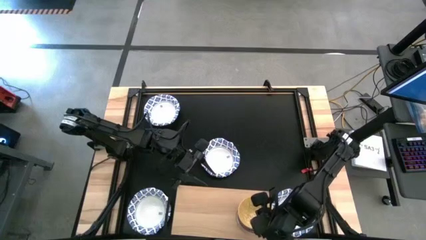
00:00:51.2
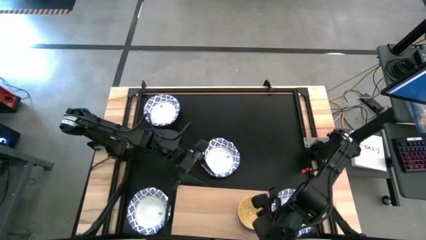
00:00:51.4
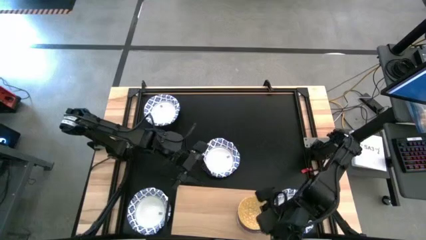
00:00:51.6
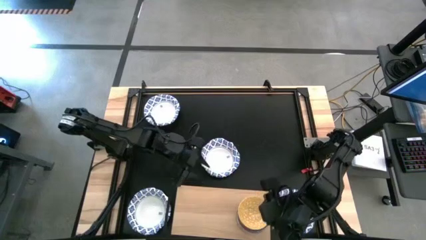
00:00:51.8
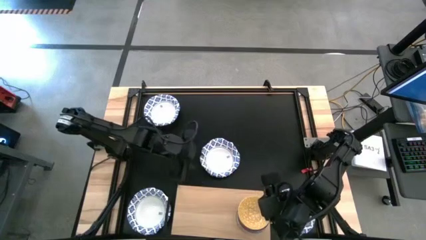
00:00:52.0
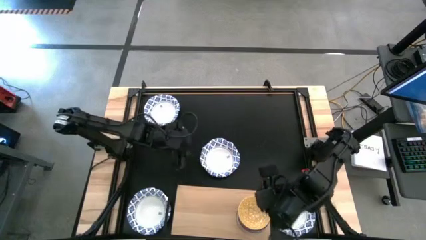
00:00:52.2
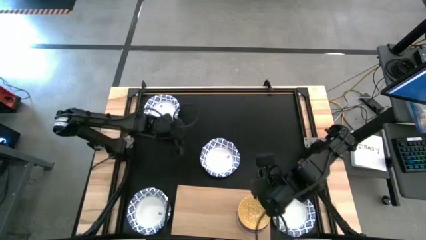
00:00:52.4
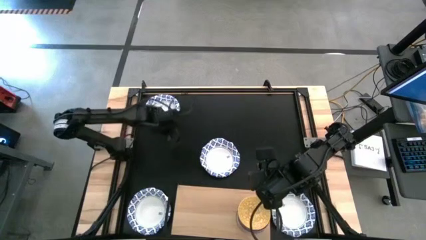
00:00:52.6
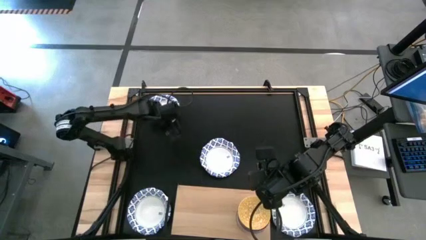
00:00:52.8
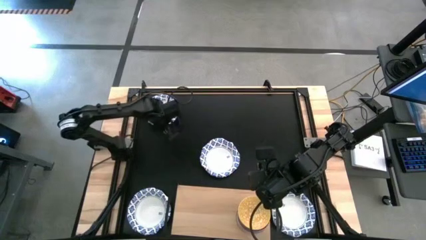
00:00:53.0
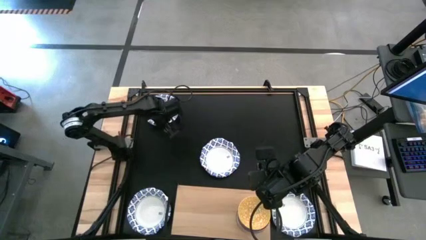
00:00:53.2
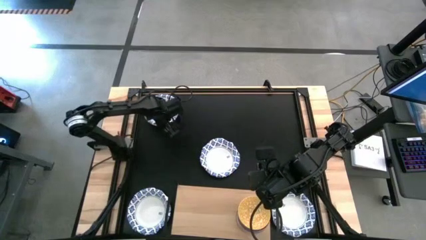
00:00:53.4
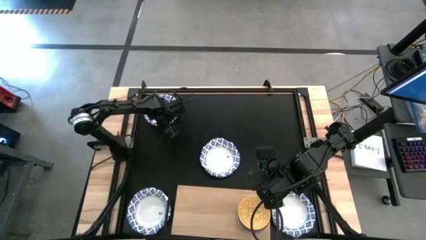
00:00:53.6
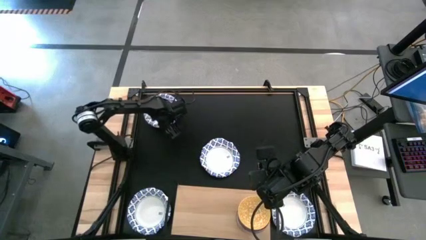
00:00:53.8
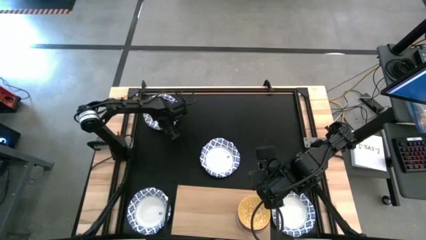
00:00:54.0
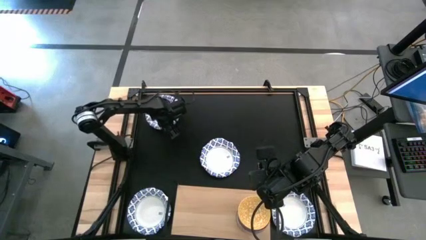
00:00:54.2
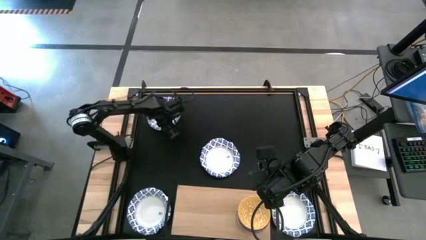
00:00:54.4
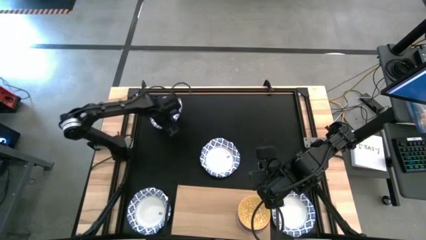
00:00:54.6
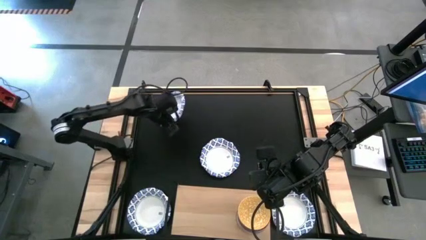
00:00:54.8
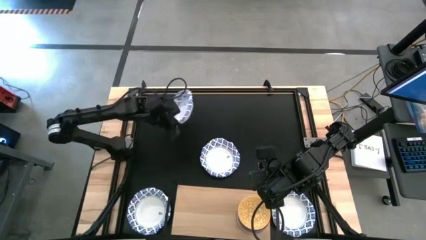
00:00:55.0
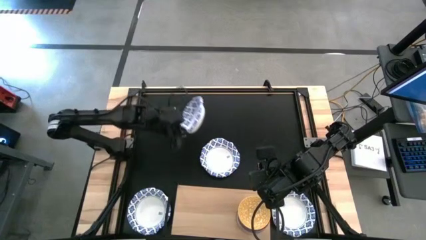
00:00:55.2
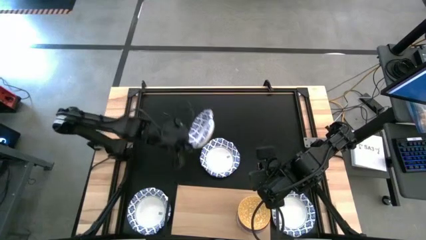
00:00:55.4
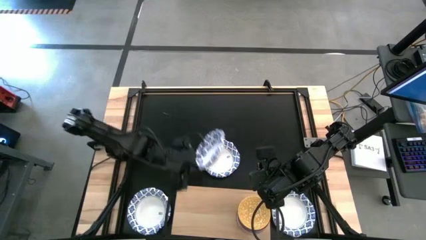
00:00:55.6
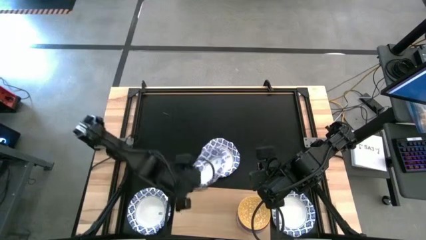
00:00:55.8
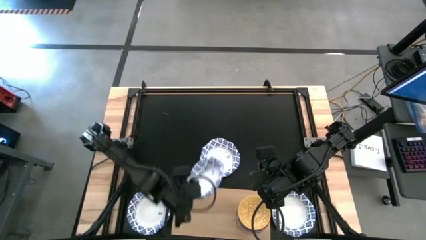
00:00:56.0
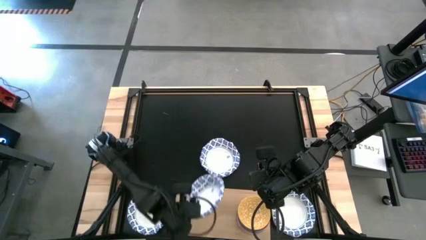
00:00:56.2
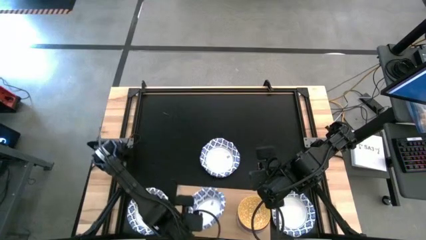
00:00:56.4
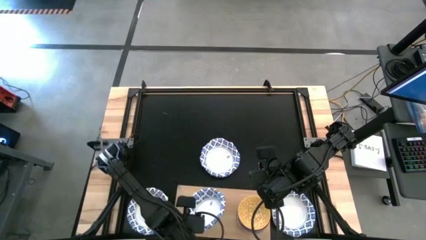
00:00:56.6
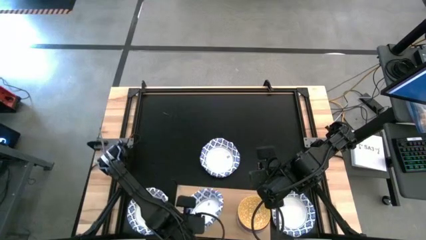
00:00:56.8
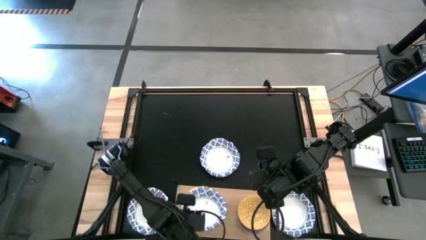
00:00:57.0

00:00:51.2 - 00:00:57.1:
Task: Place and stack bowls onto a shelf
Put the large white bowl on the shelf

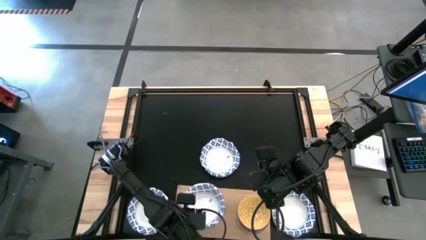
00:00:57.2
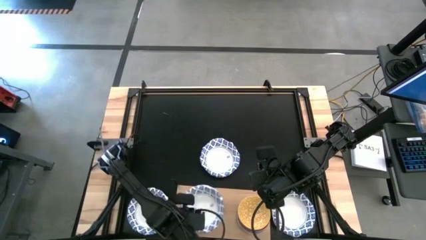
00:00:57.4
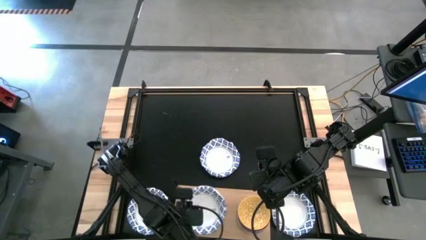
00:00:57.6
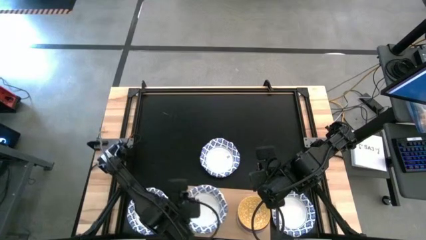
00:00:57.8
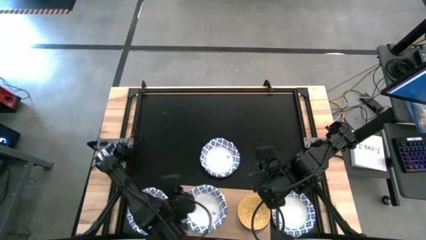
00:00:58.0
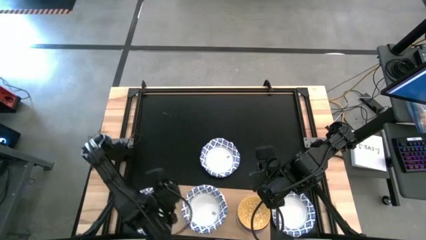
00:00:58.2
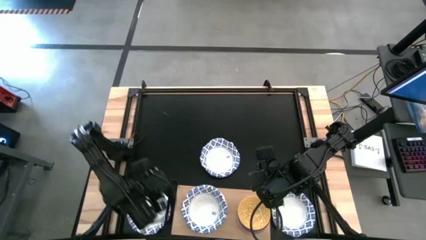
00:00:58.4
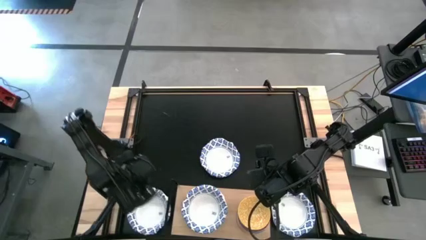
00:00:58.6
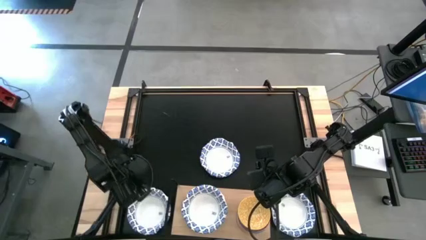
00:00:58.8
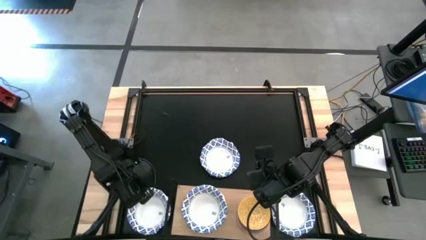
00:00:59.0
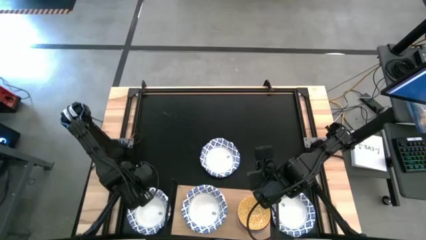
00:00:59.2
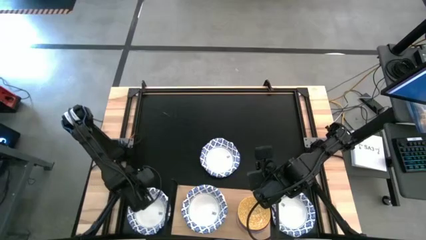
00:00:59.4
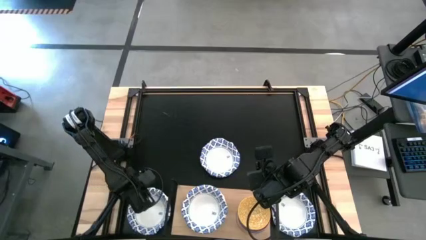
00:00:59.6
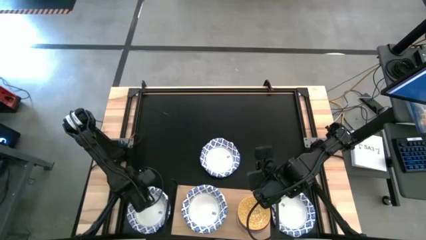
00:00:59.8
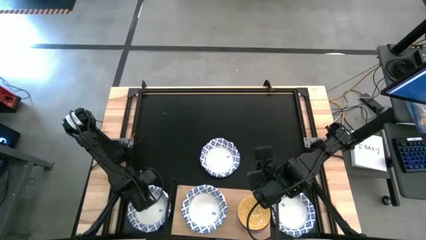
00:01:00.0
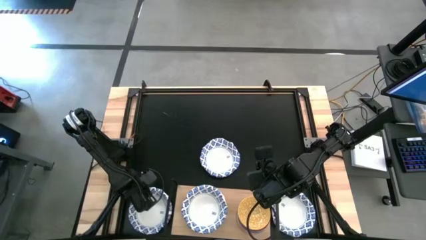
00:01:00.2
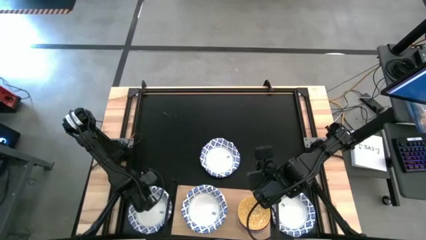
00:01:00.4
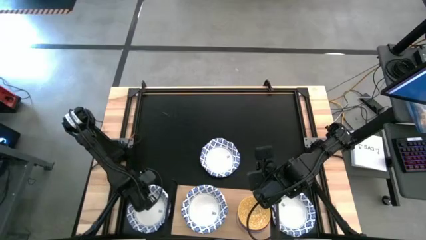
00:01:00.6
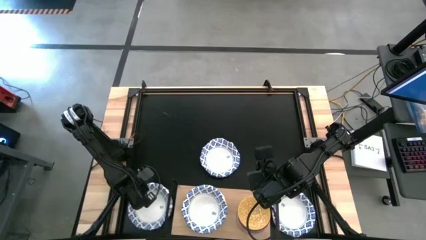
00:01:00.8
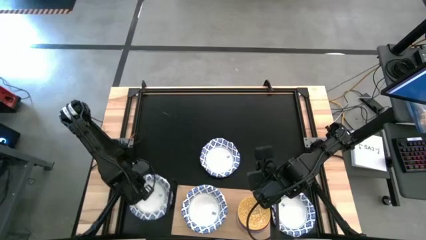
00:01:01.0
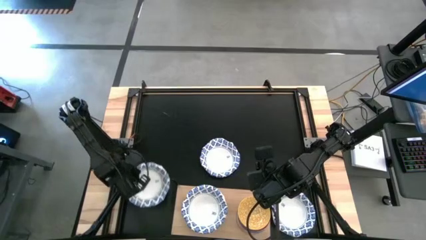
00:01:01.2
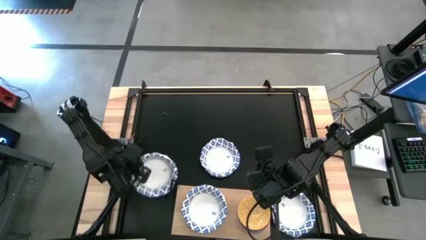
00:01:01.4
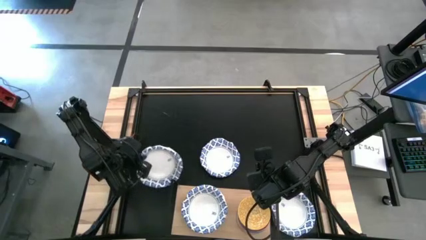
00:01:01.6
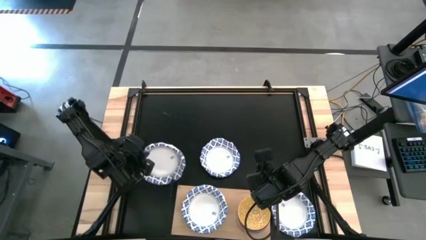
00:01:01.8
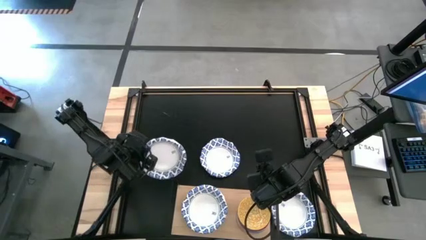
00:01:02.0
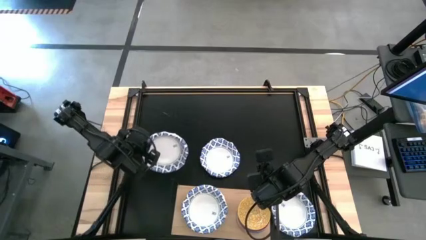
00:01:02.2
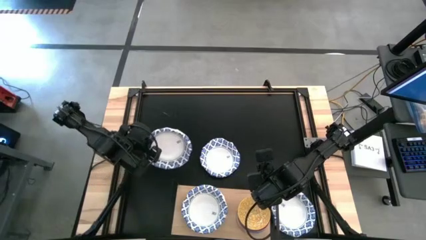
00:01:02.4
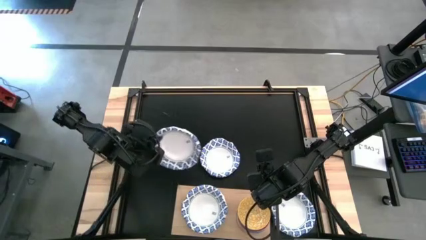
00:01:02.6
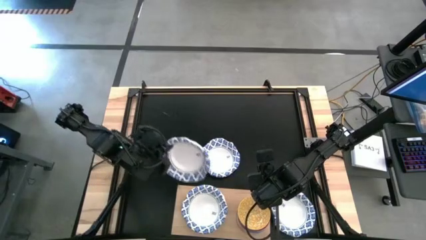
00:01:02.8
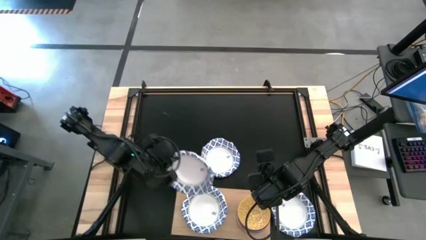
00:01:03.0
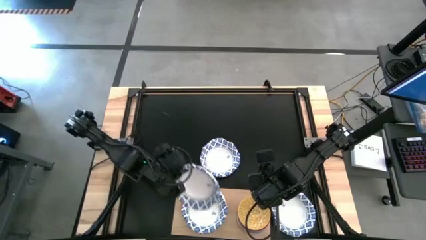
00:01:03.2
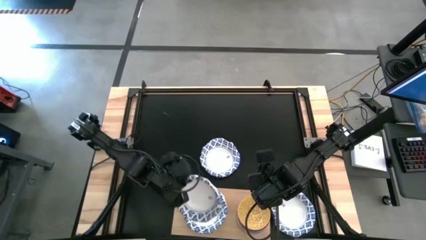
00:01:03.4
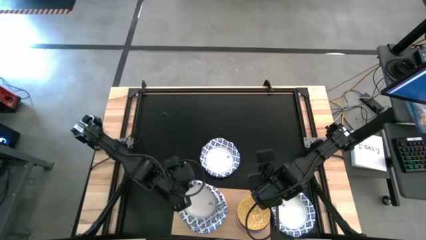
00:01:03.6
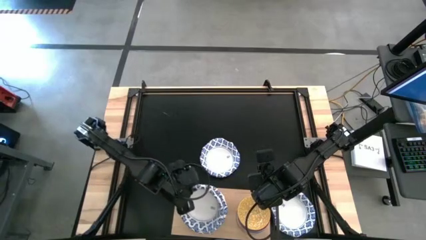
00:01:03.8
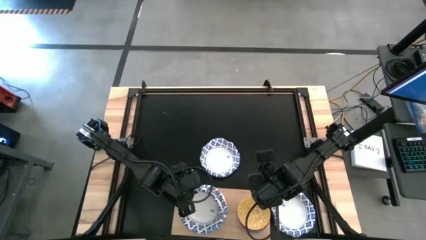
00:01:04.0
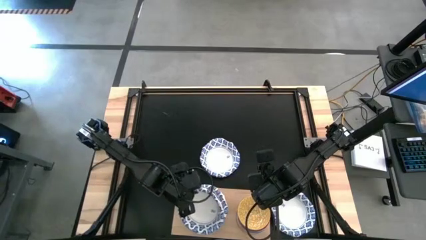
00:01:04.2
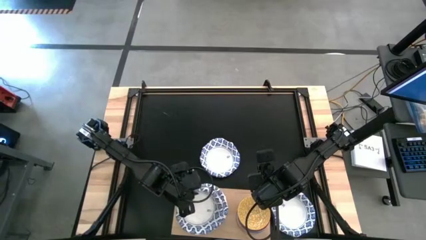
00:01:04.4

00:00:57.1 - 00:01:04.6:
Stack the large white bowl on top of the large white bowl on the shelf

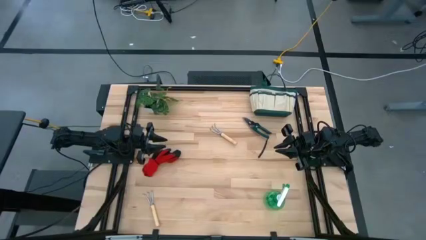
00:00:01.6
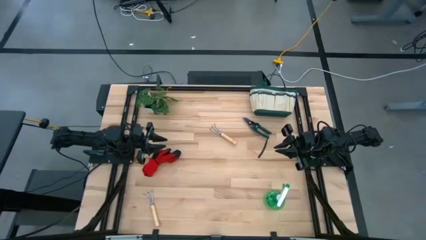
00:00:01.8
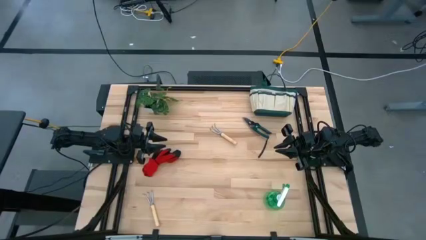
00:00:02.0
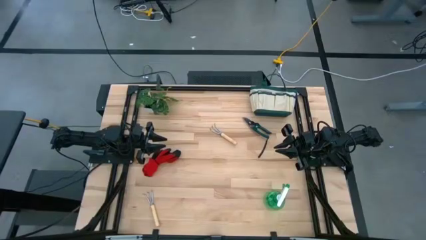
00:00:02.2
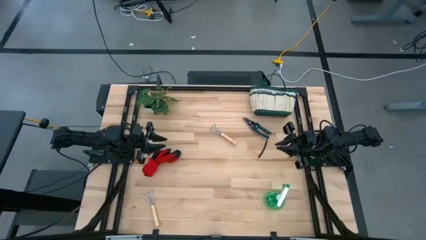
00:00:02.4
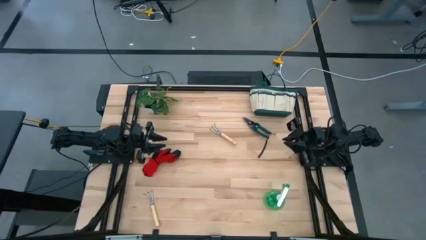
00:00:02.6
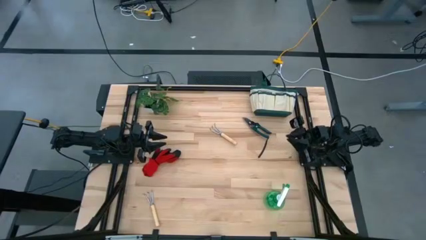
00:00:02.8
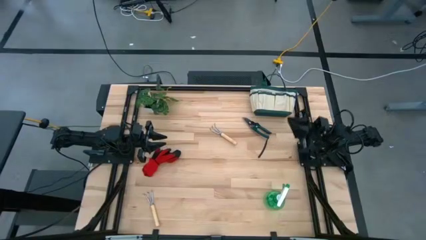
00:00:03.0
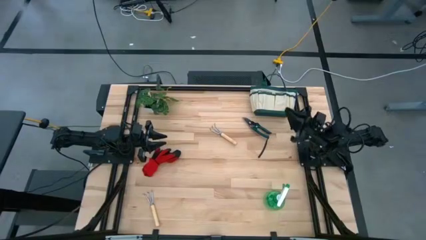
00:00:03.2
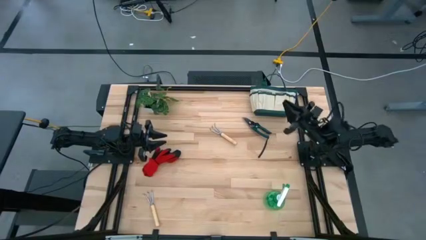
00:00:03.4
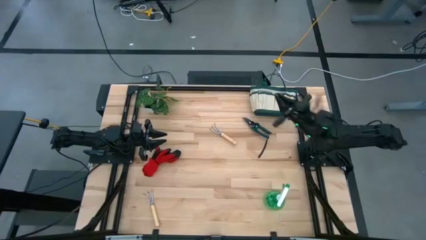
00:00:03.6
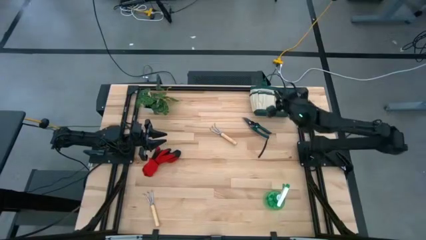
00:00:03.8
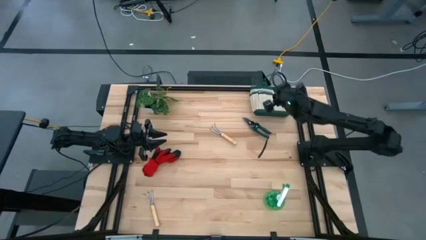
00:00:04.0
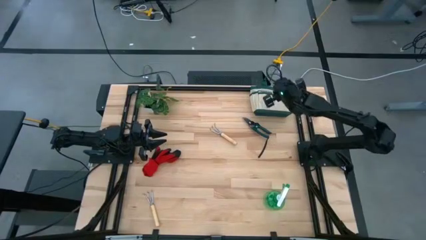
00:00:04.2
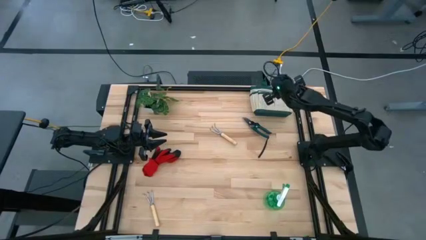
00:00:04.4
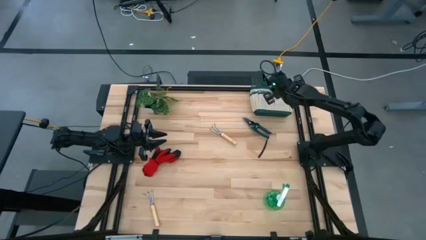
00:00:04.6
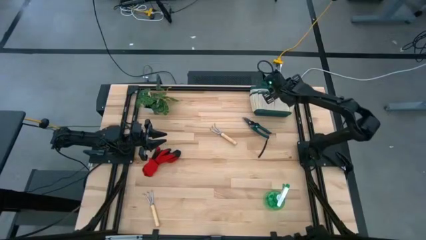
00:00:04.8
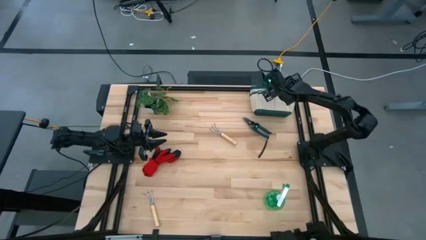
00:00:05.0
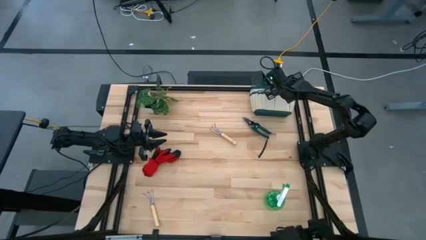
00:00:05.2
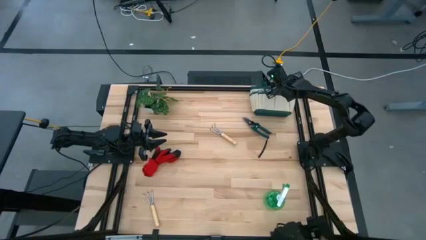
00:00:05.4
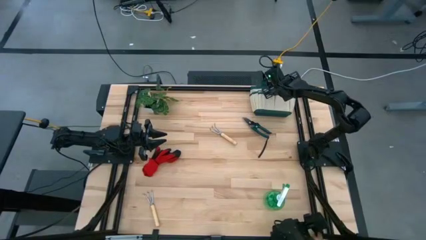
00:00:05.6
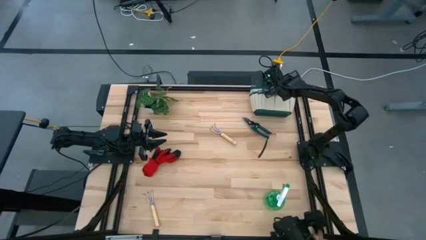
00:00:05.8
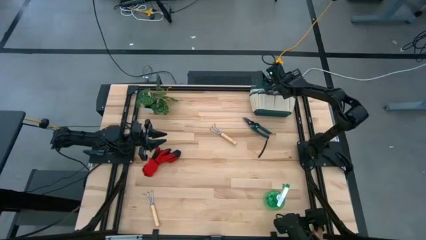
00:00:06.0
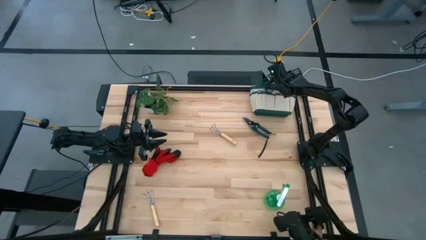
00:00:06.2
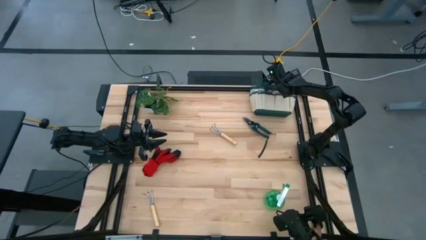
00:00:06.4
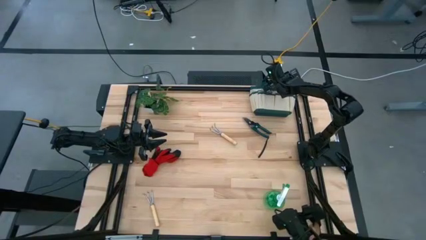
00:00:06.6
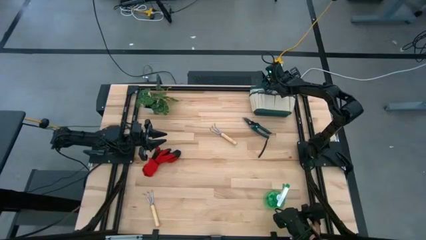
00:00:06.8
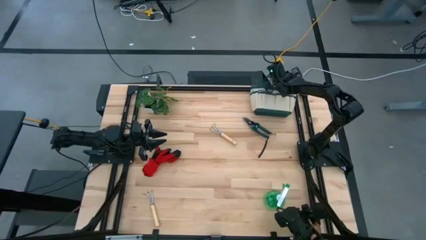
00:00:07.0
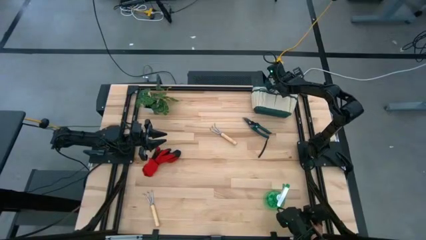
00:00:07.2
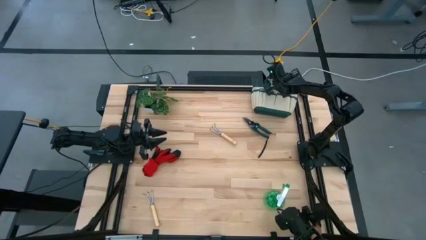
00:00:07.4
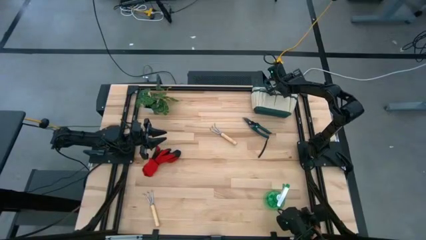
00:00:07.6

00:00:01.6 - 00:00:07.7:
Task: Pick & Place Garden tools in Gardening bag
Prepare the green gardening bag
